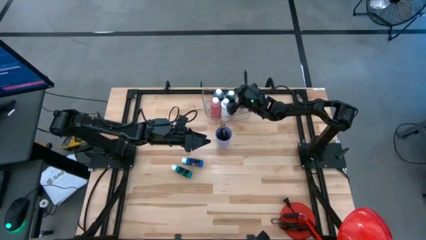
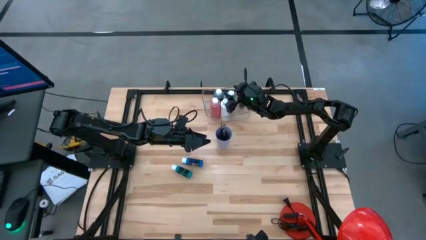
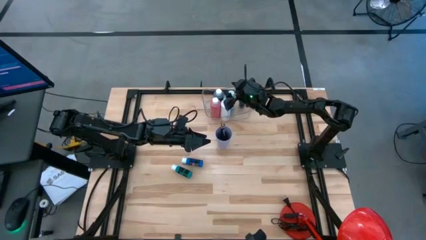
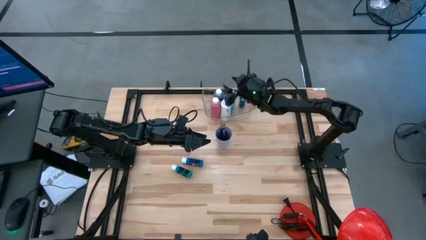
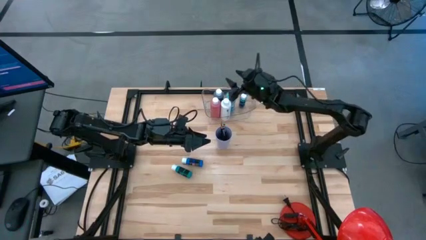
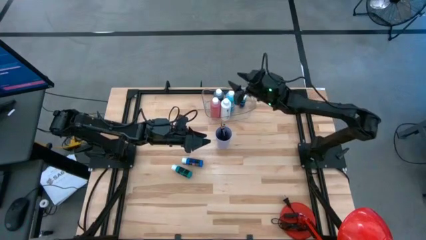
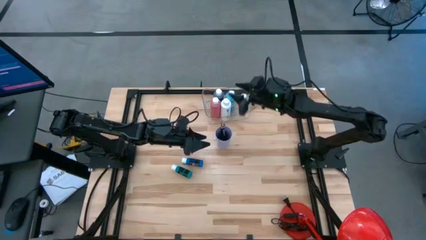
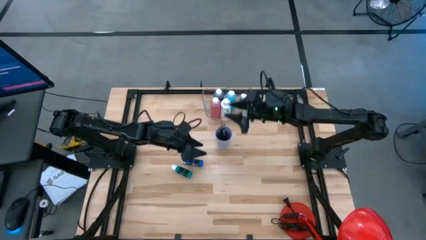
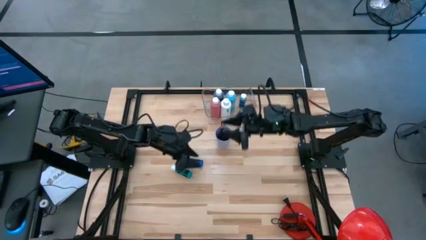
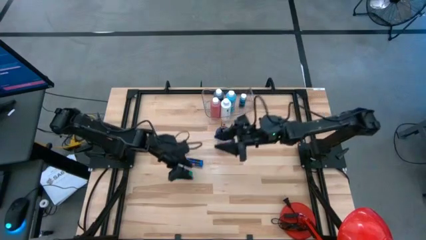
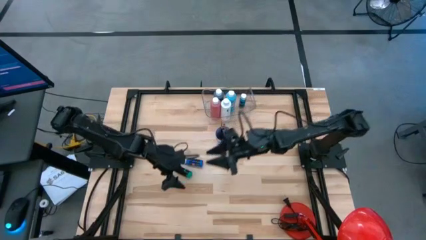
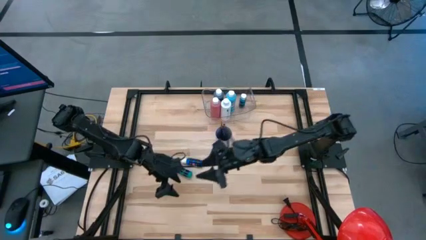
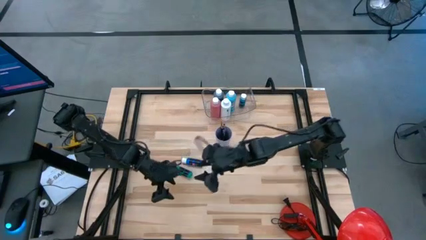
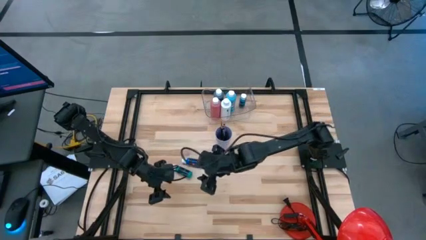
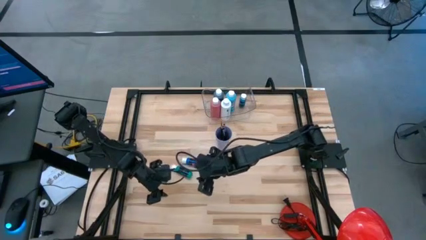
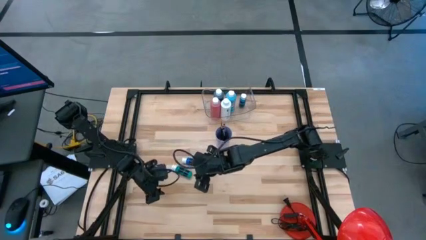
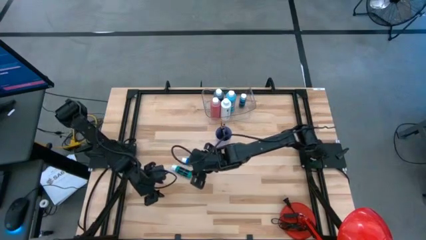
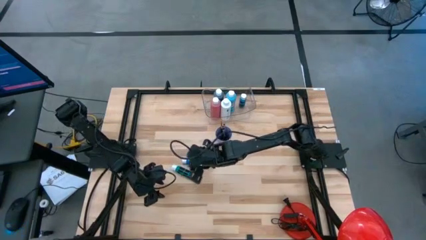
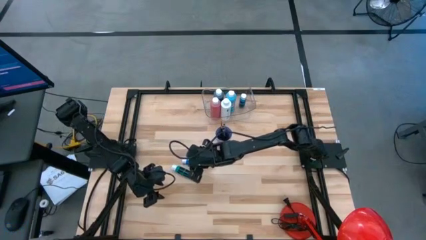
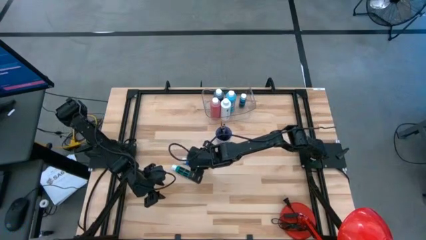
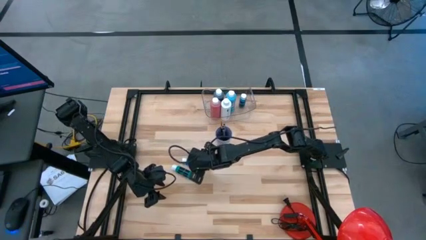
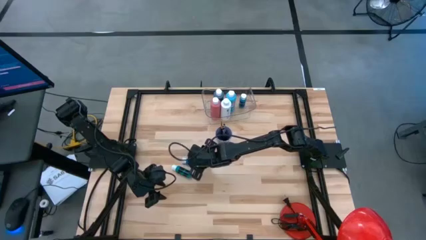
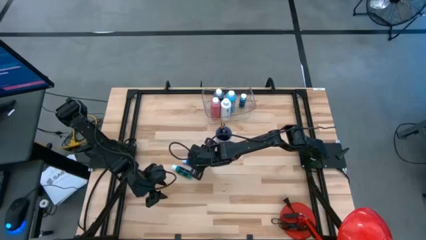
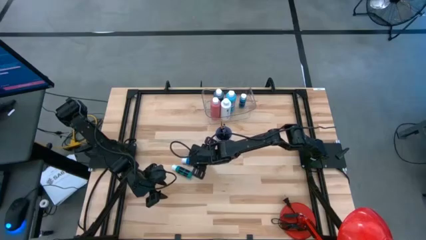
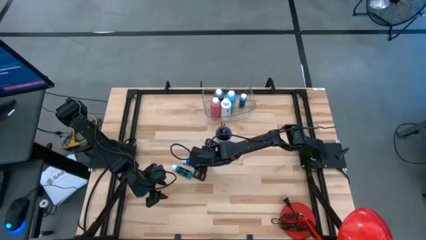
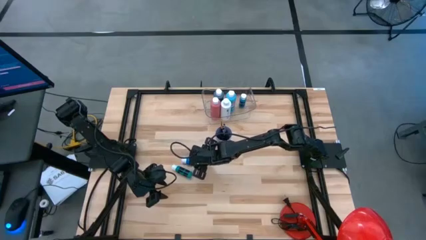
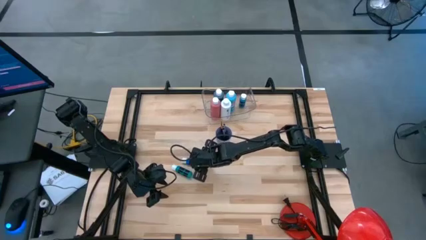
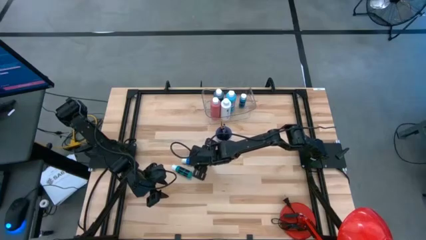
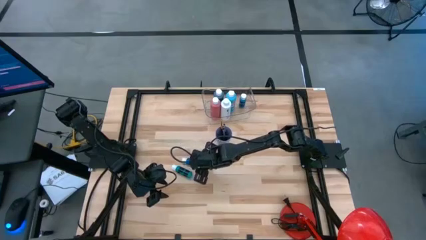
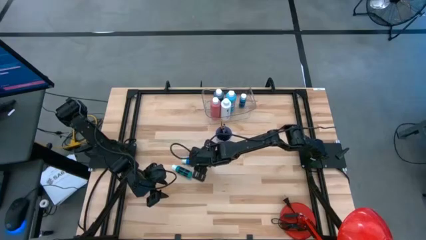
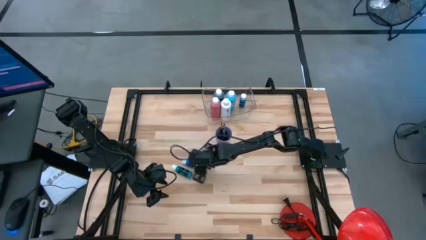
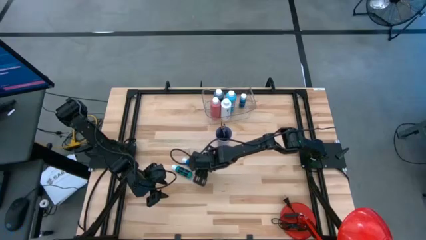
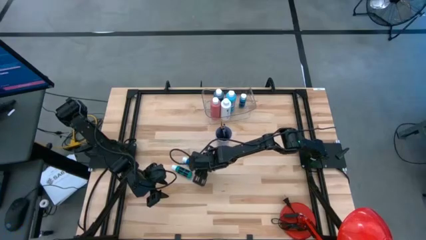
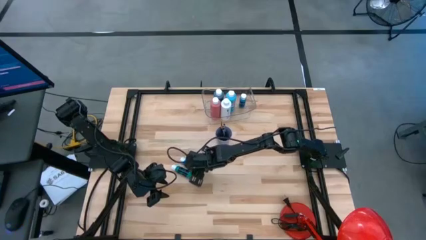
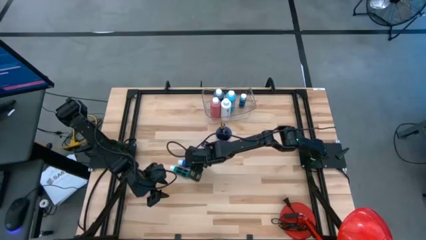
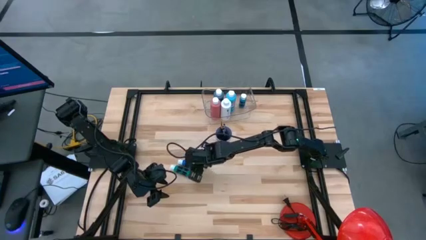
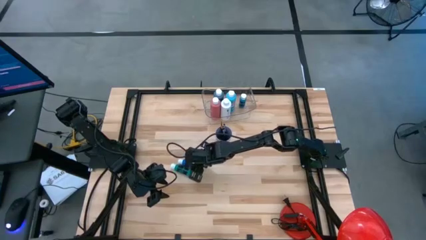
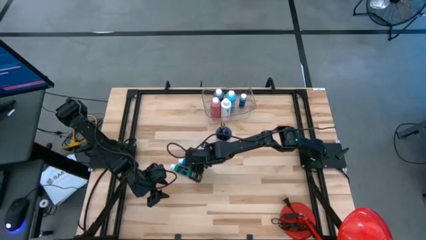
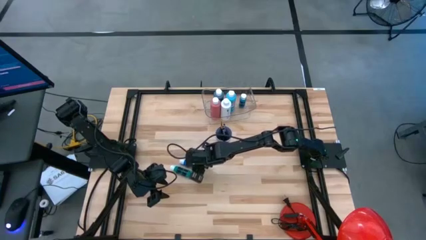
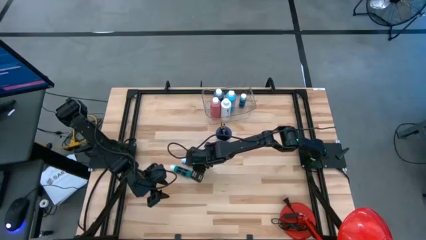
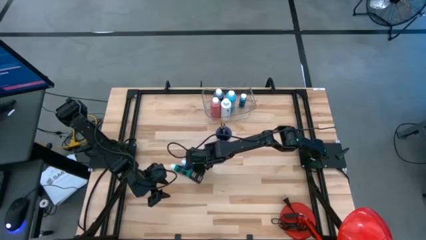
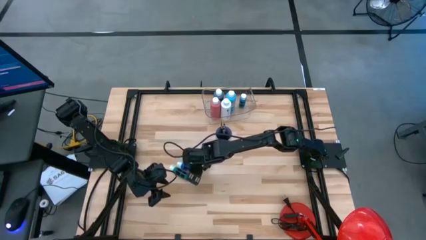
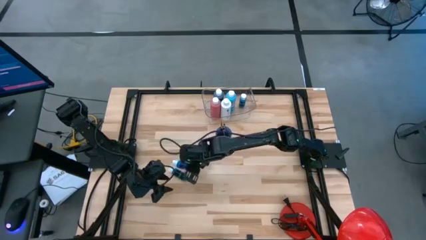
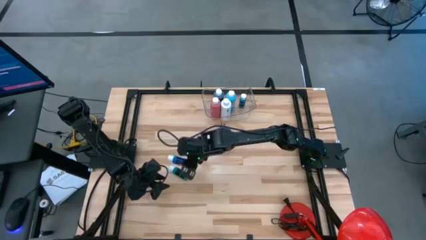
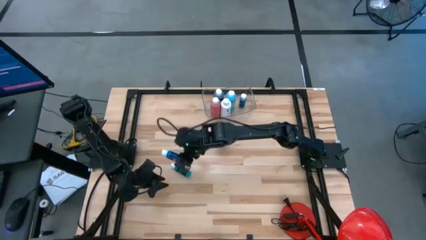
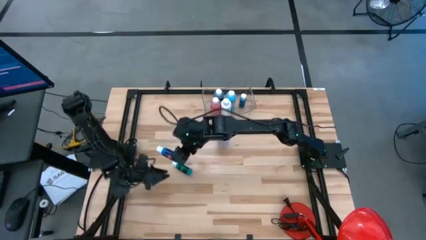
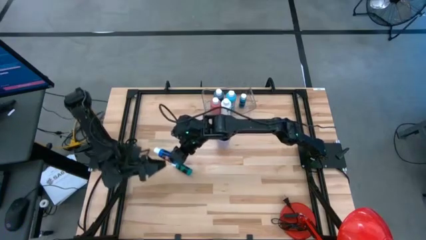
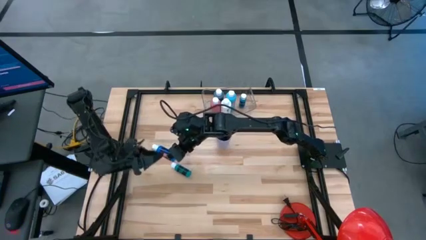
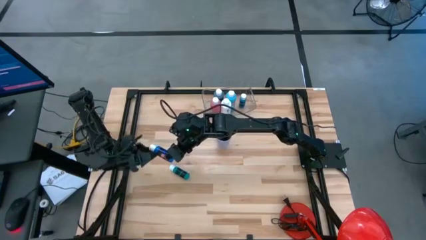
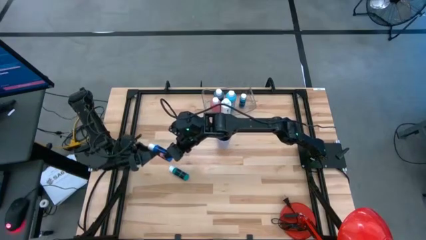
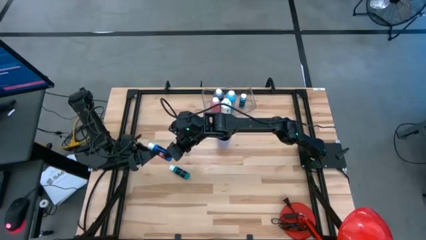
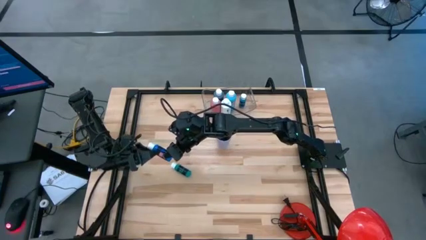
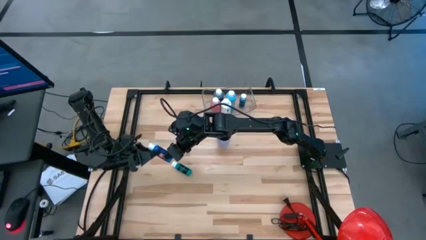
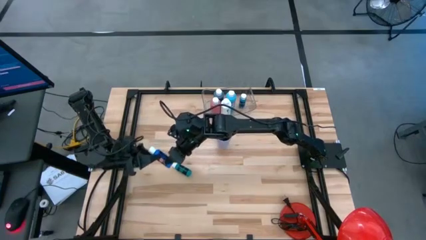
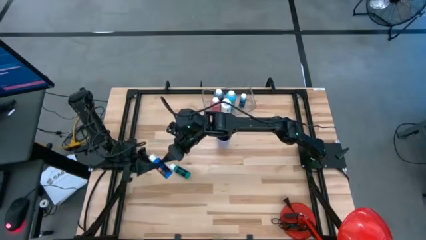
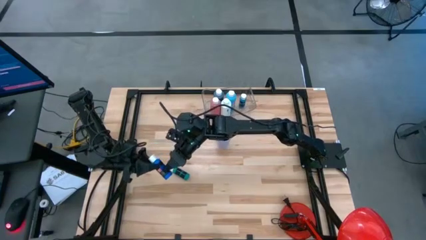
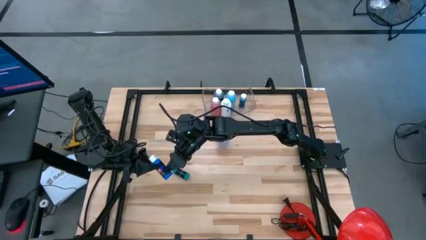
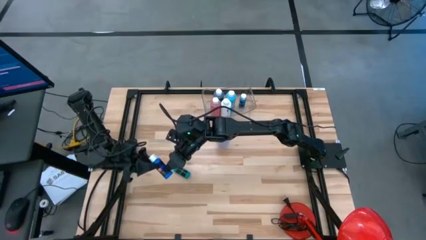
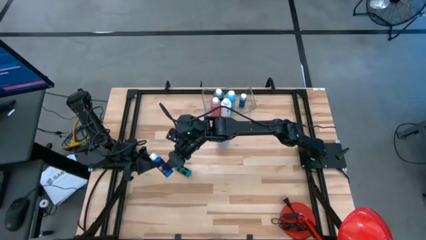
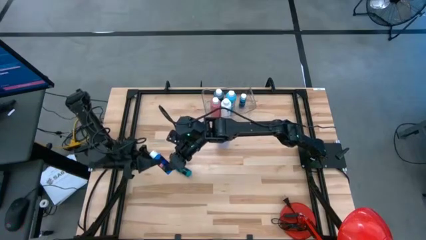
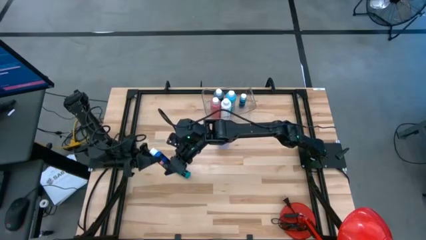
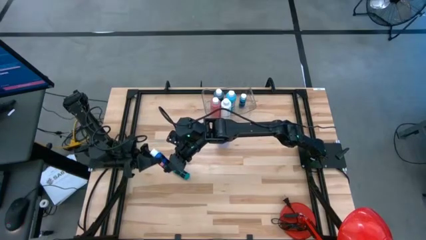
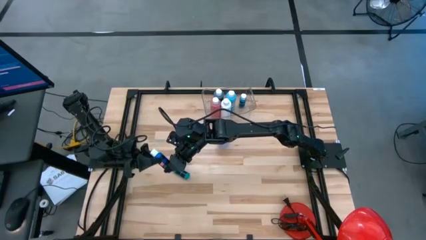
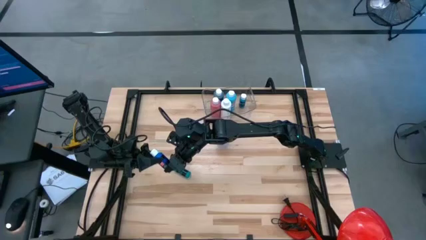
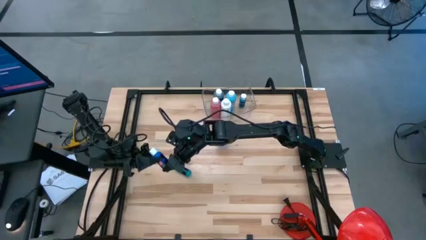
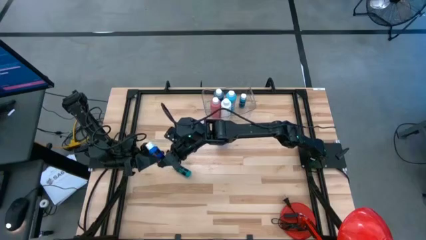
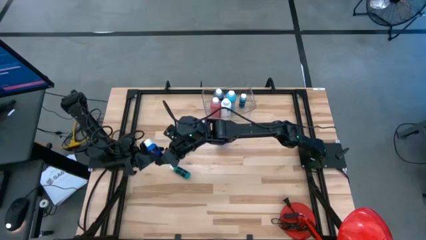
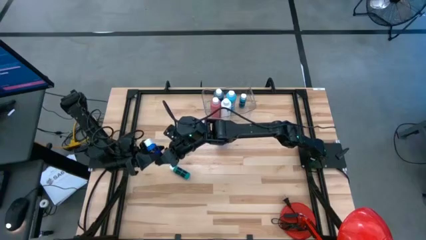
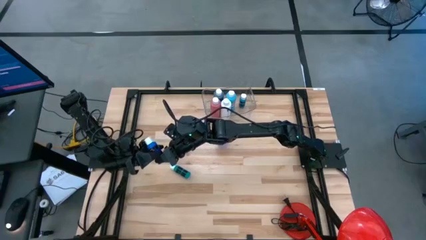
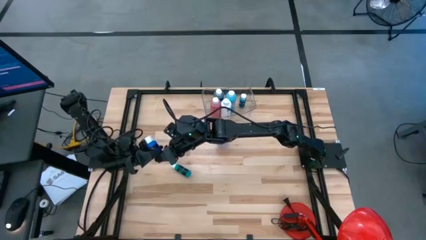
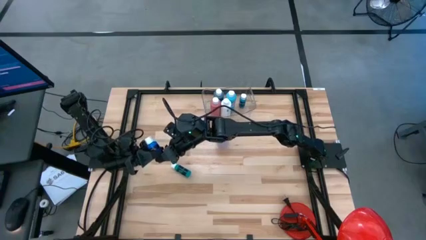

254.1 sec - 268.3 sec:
Task: Pick & Place Paint Supplies
Put the blue paint bottle into the transparent bin

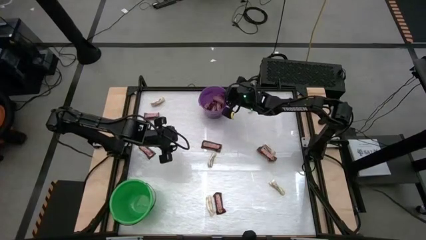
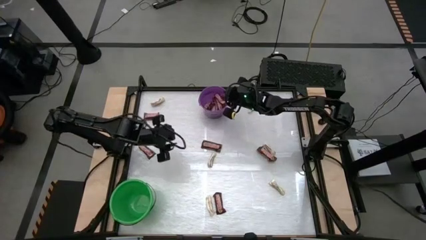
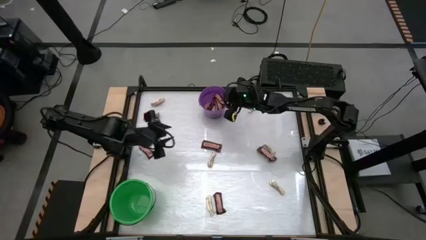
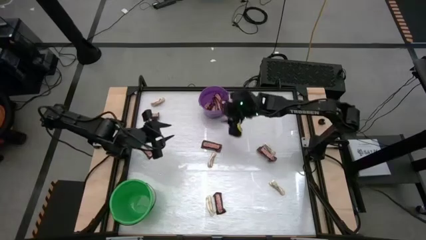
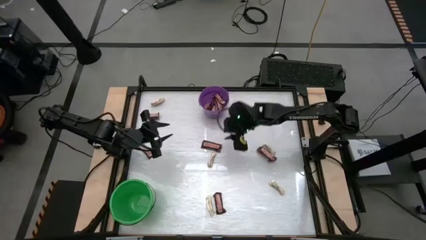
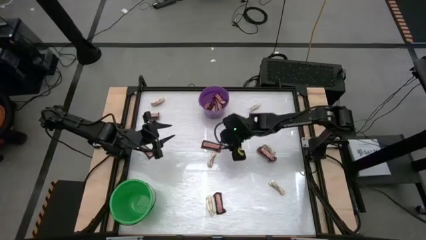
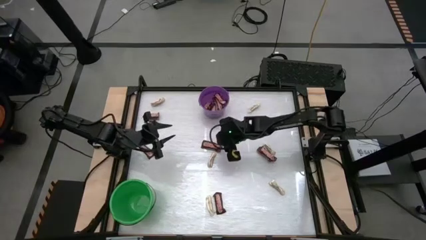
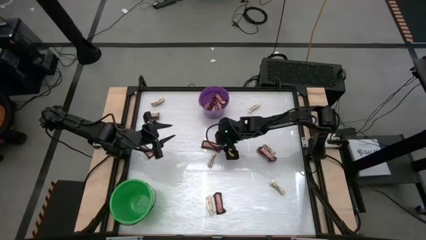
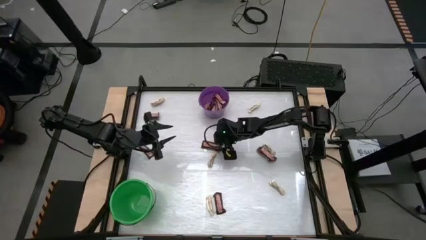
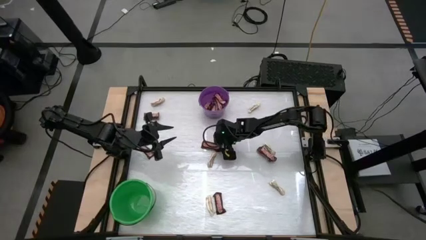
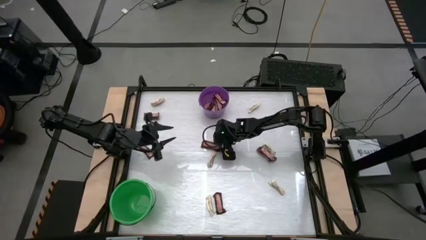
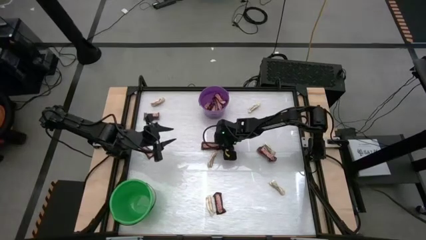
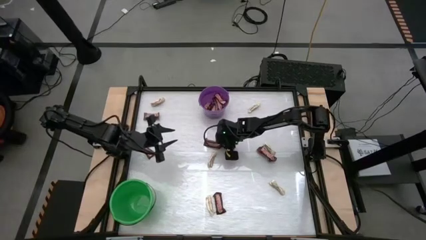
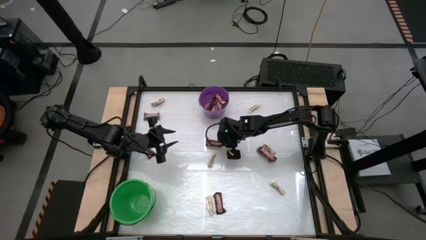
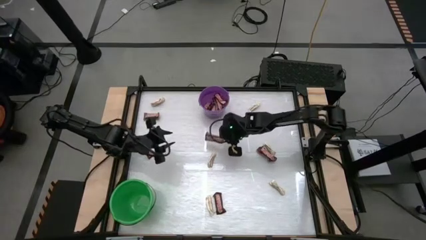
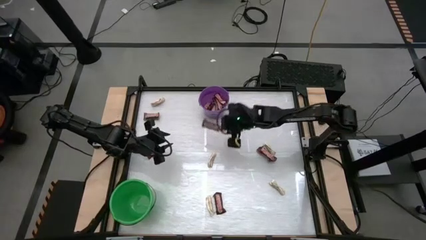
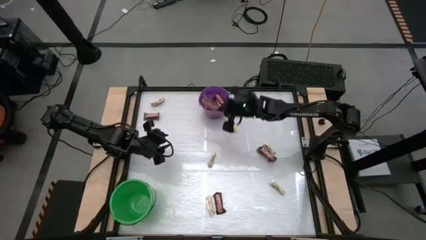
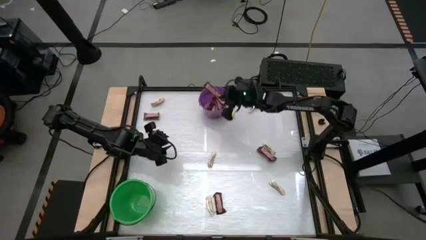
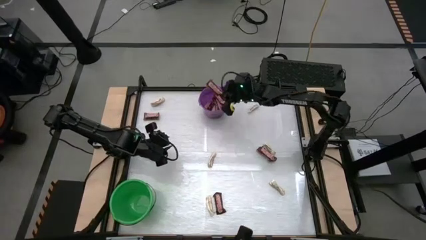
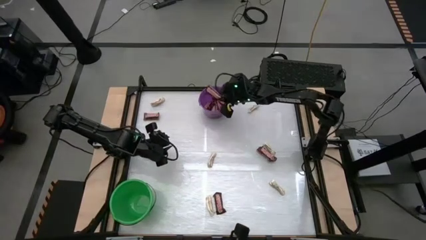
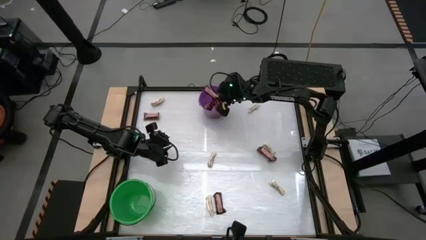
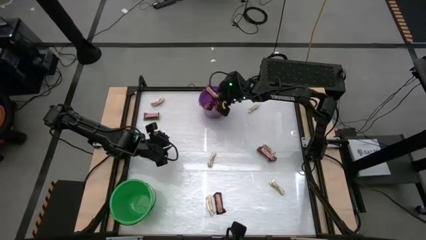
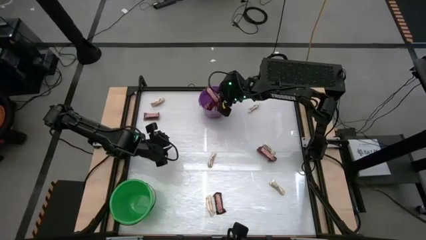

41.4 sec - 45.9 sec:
Task: Sort candy by brand, put in halloween buckets
Put the brown chocolate into the purple bucket
